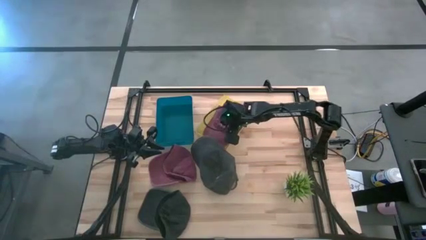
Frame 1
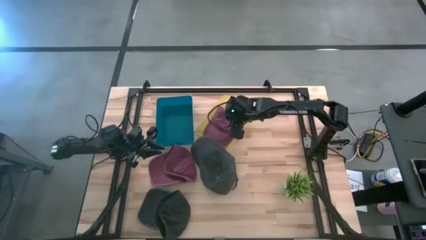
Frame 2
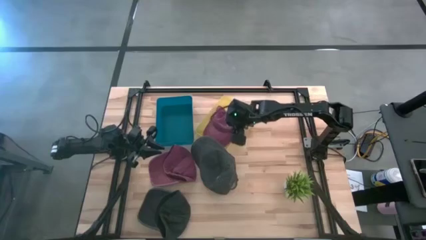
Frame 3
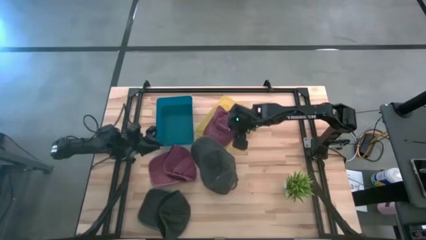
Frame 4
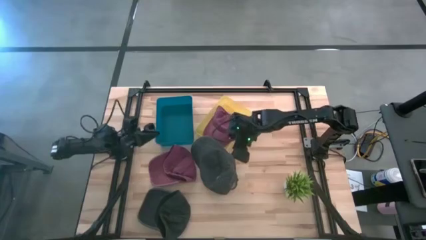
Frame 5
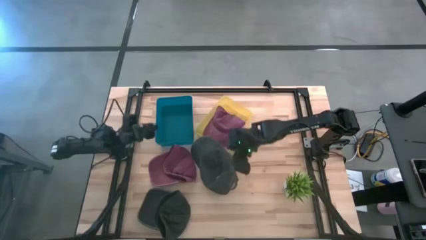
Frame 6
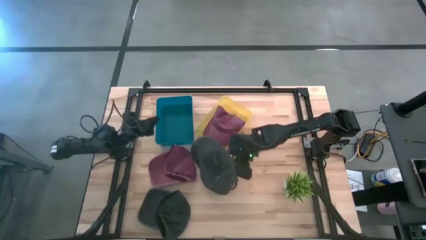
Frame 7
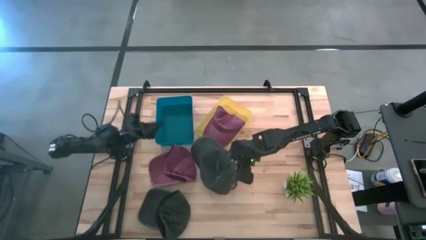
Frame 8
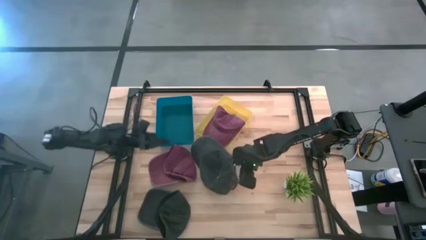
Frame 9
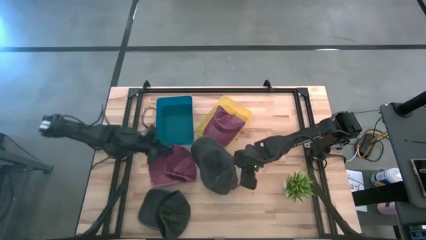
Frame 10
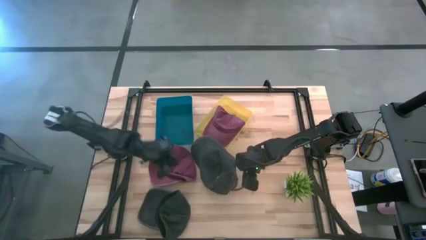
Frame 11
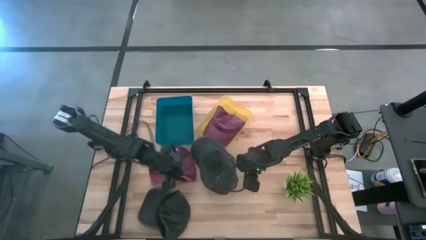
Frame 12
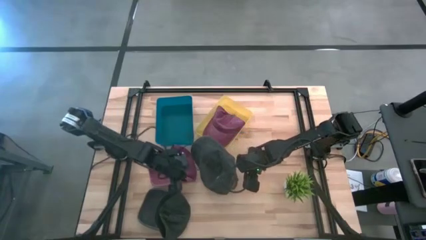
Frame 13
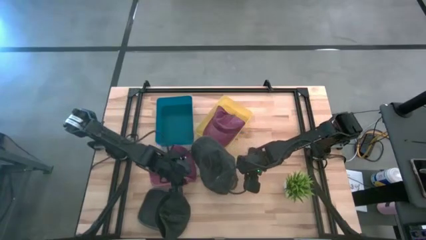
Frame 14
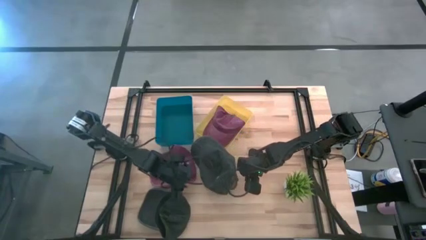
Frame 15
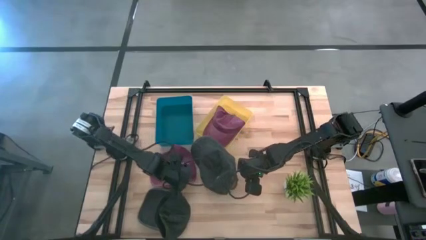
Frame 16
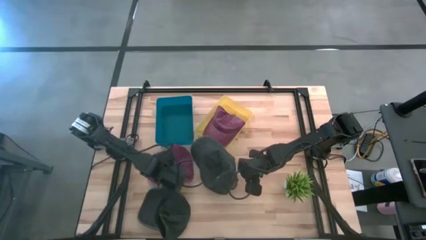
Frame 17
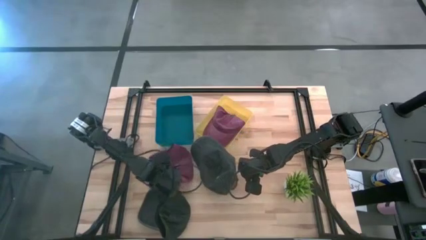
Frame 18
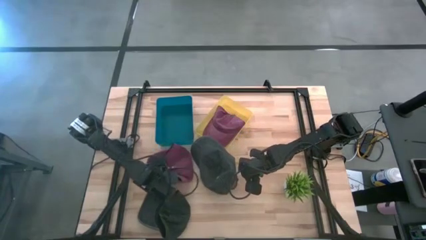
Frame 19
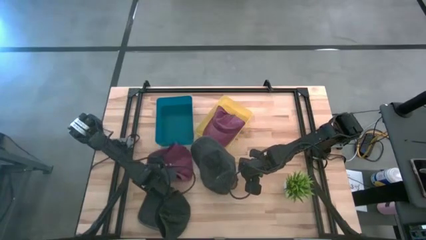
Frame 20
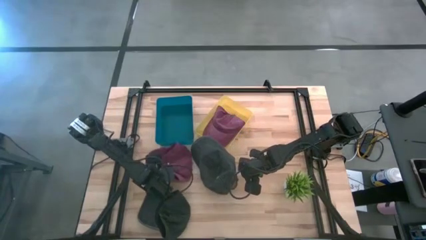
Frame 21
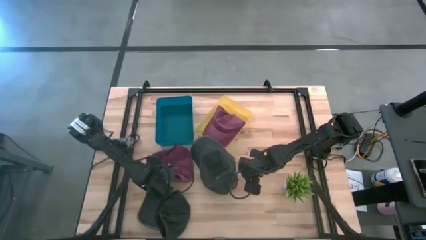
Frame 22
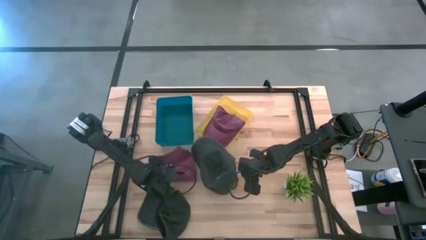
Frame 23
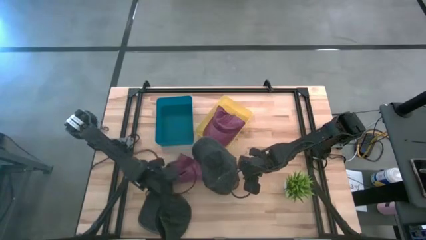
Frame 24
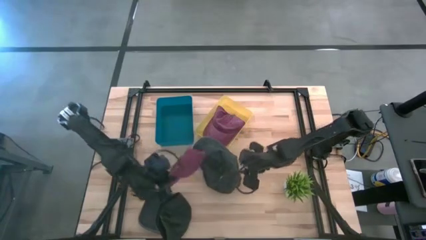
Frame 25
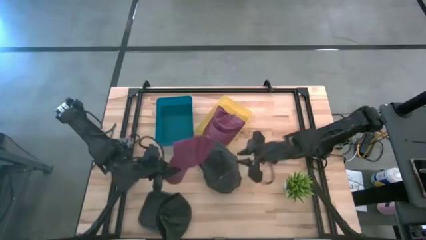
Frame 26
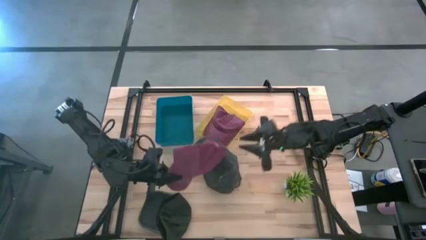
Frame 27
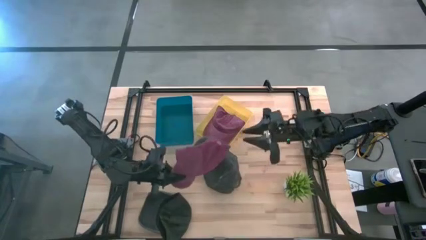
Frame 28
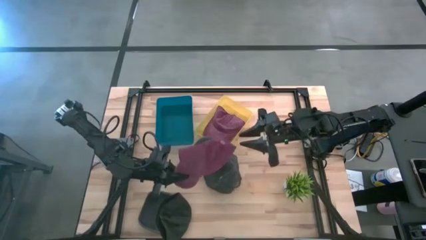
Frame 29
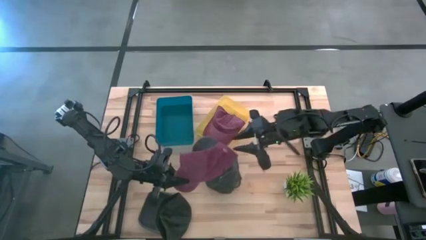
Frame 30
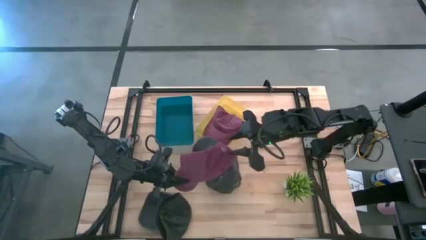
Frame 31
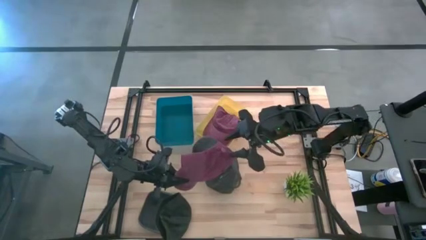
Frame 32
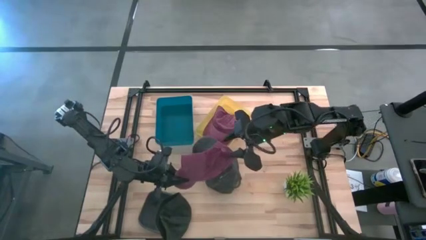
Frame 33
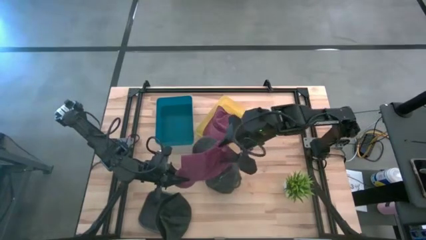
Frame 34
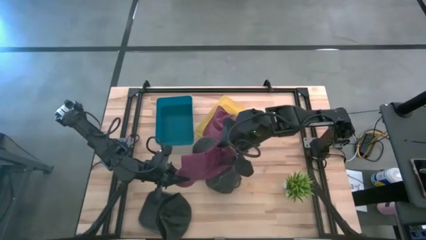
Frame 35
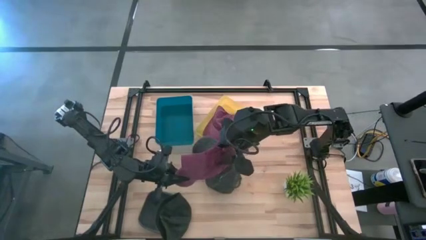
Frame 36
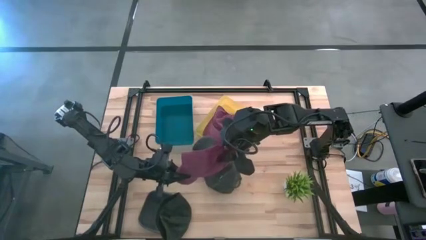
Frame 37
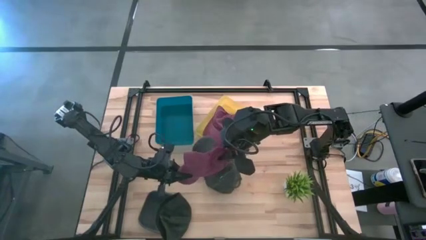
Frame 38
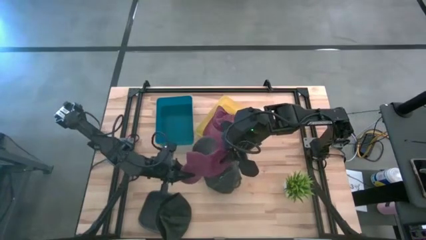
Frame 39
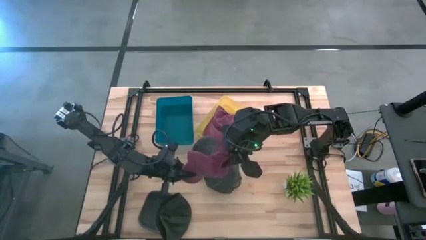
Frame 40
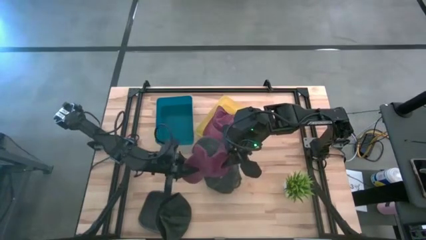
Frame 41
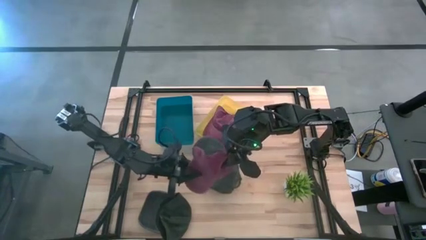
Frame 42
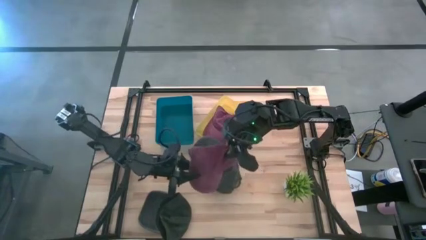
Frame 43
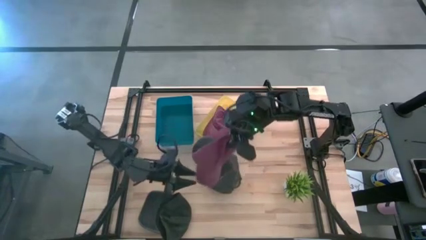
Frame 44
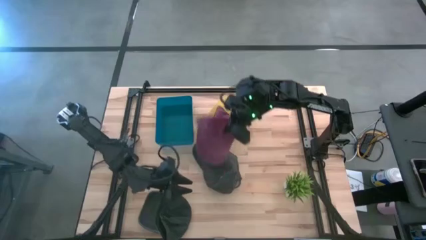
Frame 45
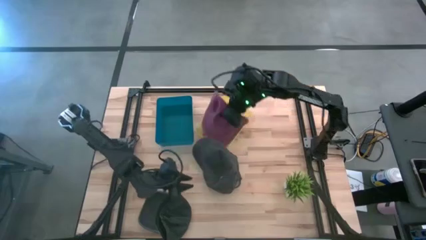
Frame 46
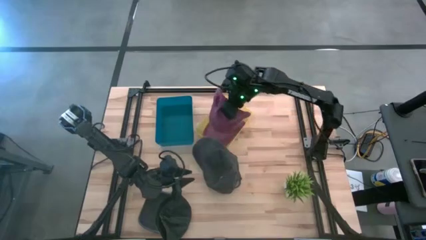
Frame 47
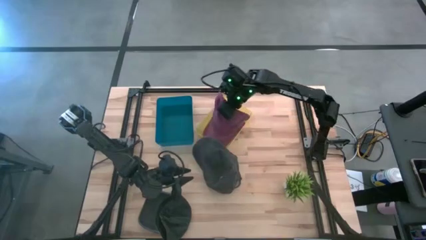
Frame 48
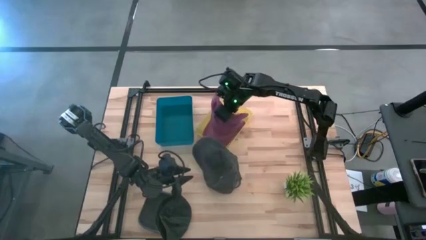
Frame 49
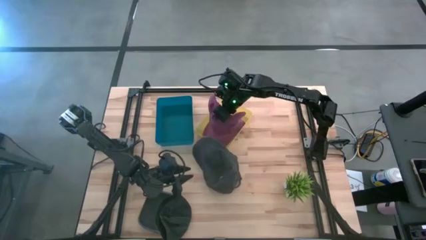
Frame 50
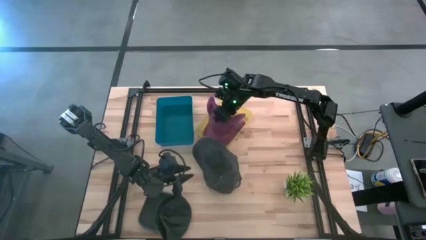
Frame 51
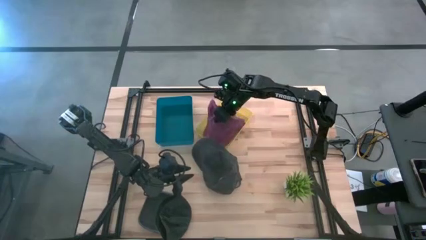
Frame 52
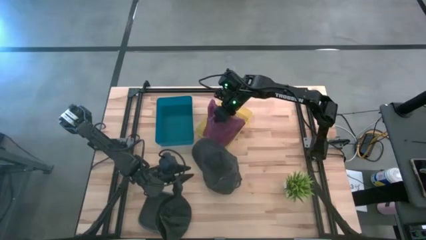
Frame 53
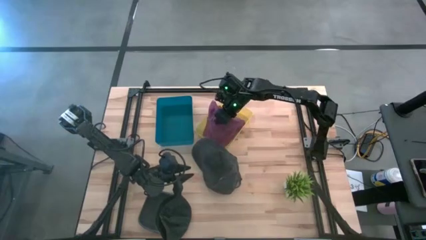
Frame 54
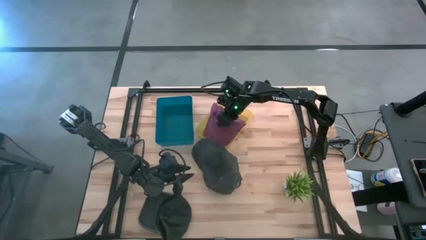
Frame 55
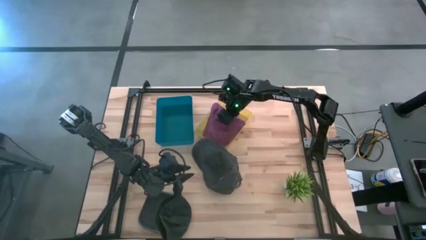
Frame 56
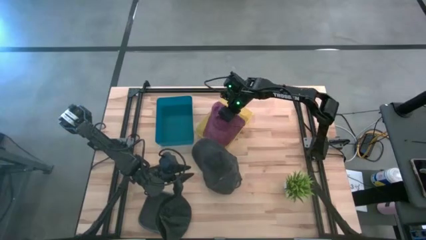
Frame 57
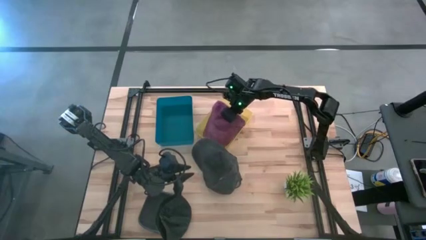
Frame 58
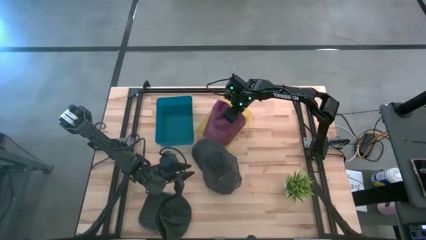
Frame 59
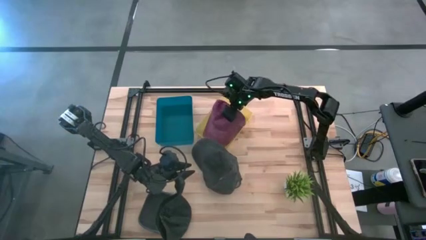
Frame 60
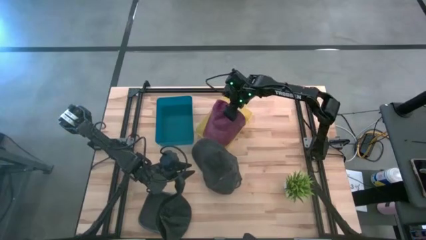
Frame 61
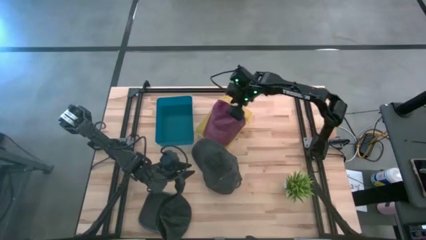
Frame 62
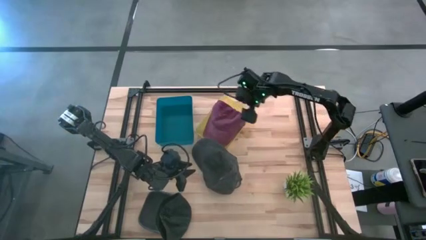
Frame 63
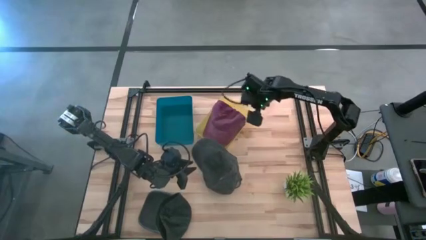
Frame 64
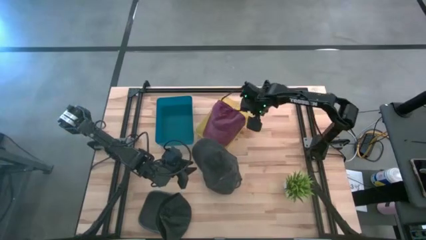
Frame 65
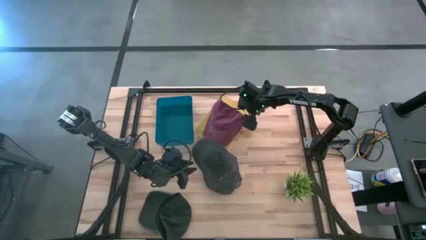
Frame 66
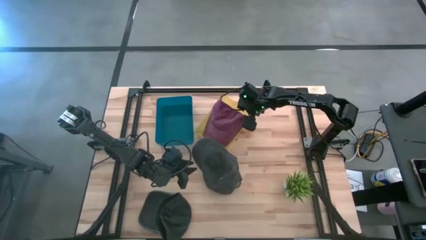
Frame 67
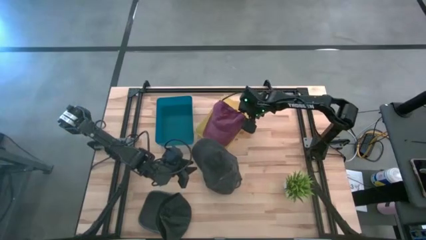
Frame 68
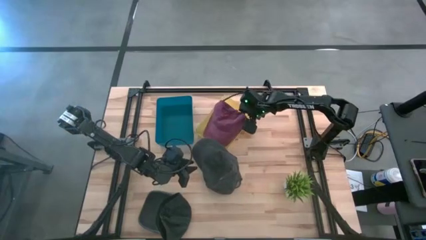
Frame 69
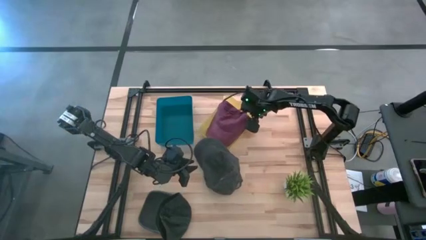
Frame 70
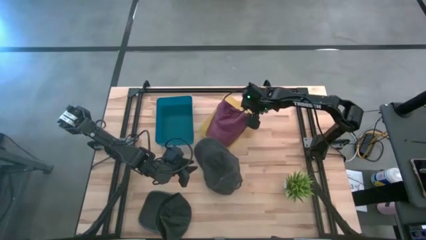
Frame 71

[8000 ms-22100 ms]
Task: Pick & Place hat
Put the dark red cap into the yellow bin

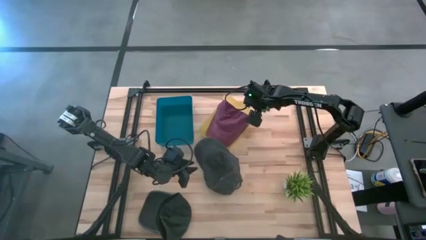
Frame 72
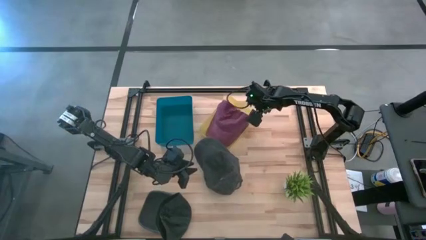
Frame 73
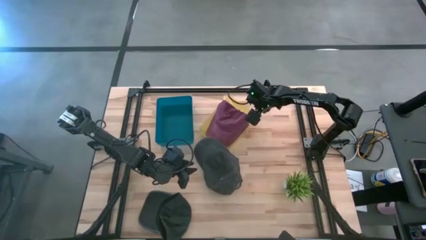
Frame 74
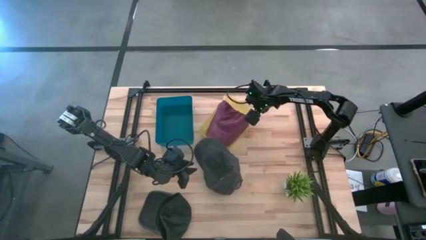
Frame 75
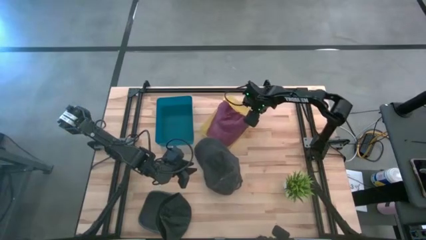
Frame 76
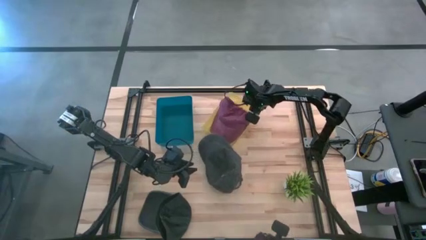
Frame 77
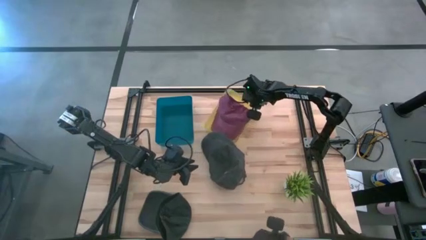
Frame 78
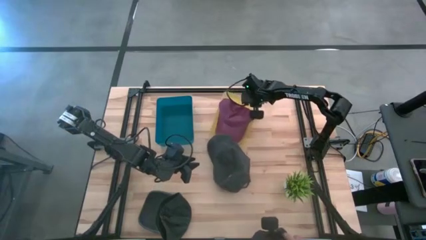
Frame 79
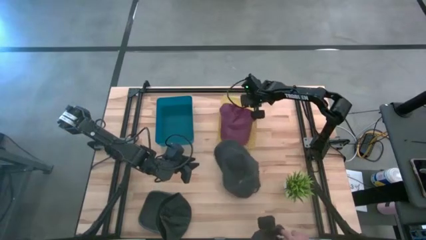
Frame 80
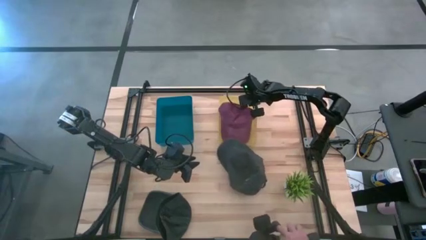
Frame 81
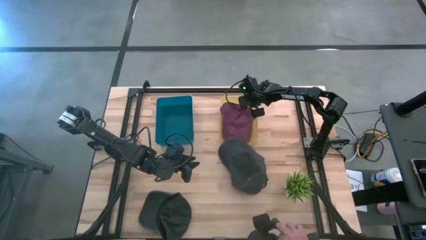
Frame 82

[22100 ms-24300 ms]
Adjust the yellow bin

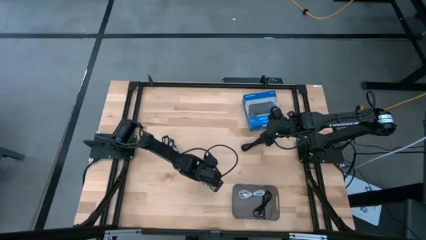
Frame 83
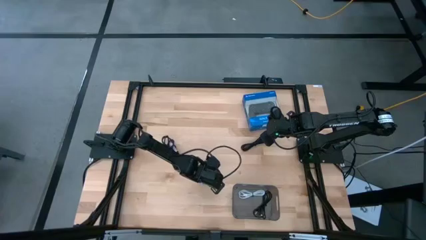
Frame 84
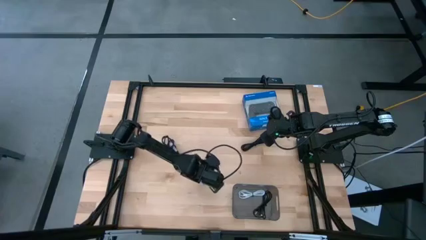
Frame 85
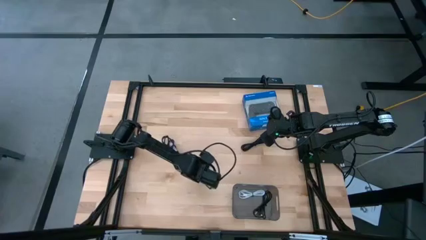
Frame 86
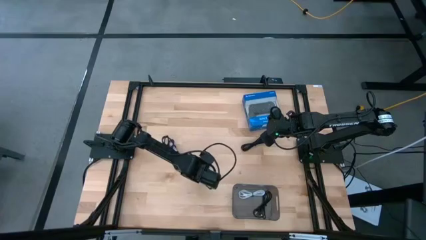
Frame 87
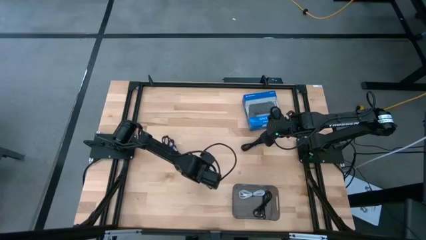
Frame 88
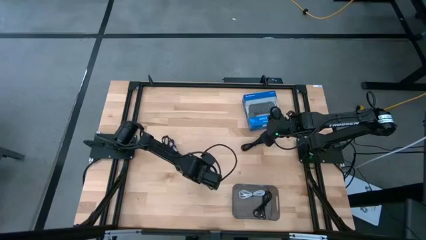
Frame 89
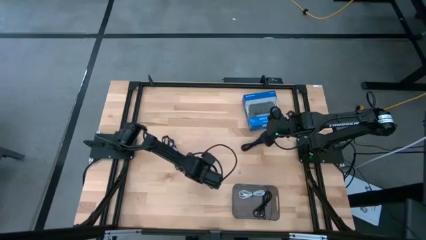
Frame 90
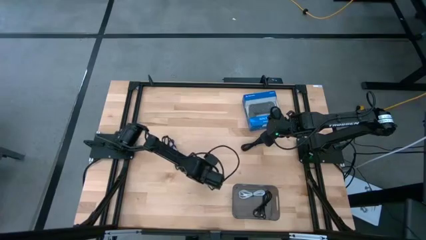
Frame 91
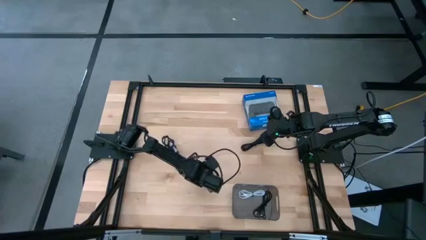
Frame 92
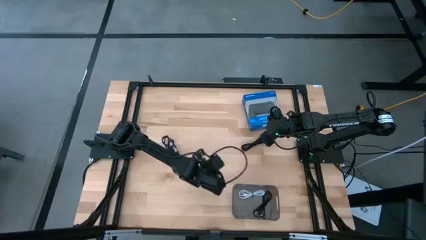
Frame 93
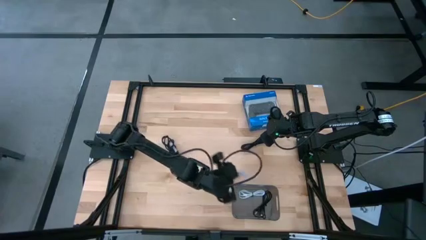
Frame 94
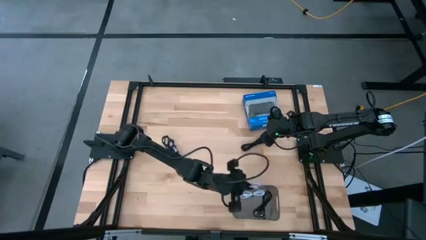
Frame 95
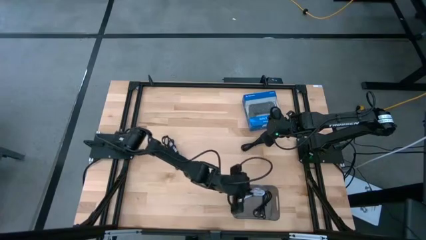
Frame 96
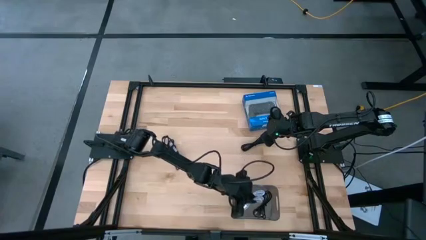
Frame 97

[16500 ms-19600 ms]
Task: Pick and place USB-C Cables
Put the white charger cable into the black bin
